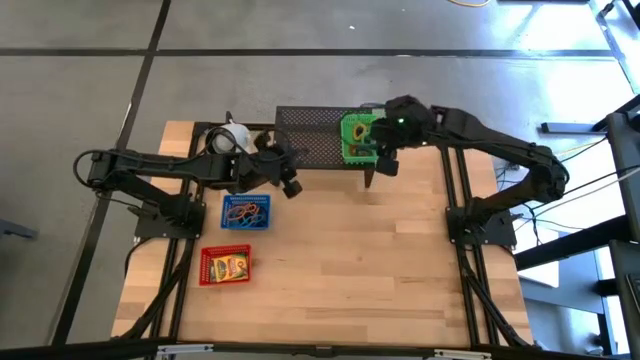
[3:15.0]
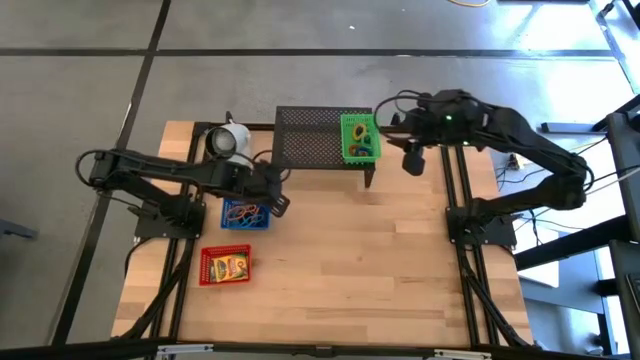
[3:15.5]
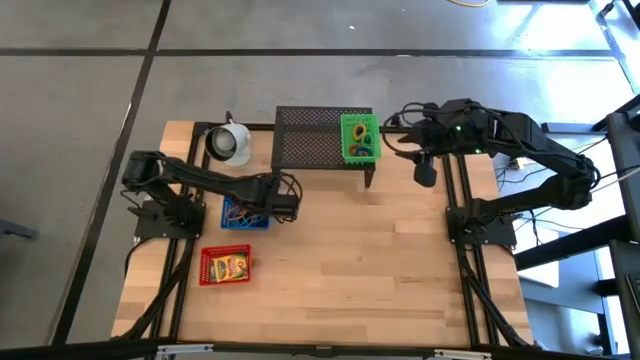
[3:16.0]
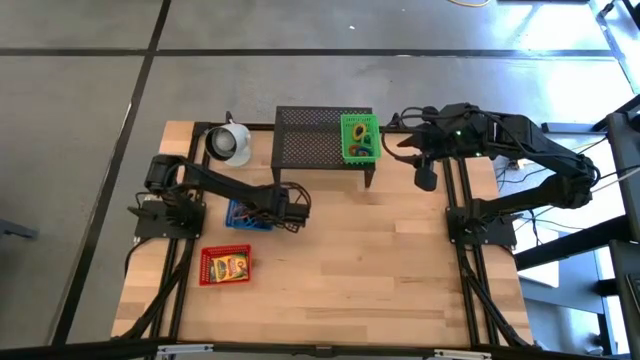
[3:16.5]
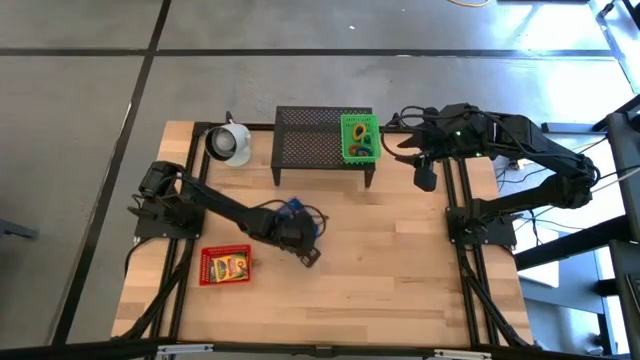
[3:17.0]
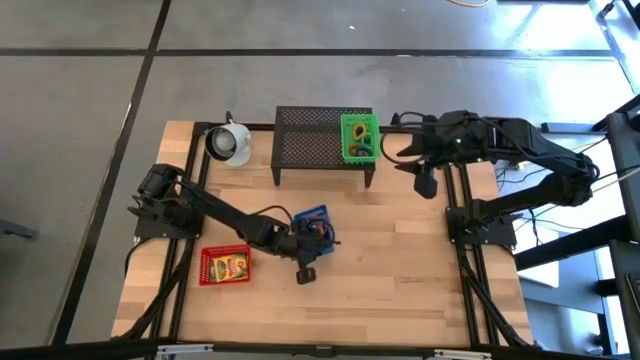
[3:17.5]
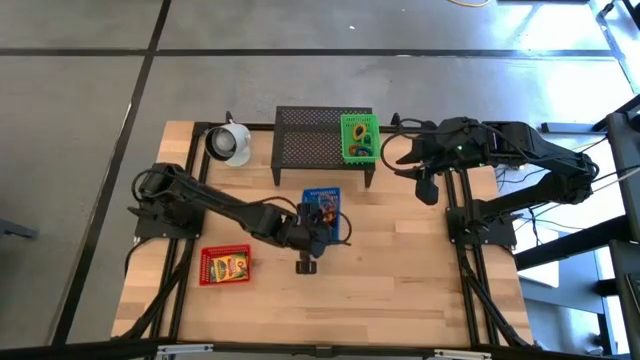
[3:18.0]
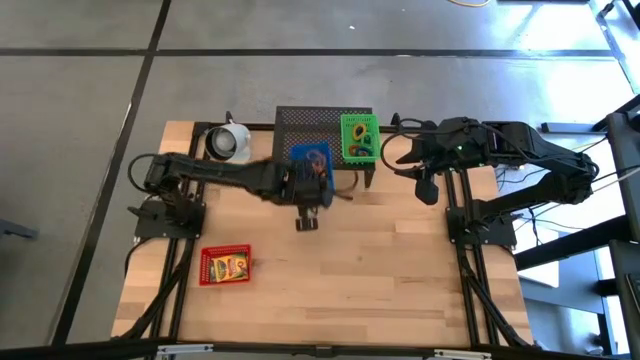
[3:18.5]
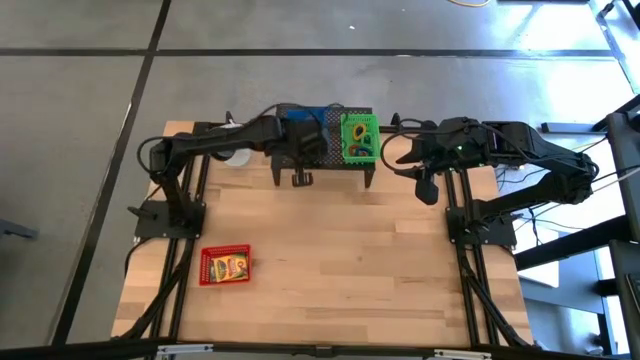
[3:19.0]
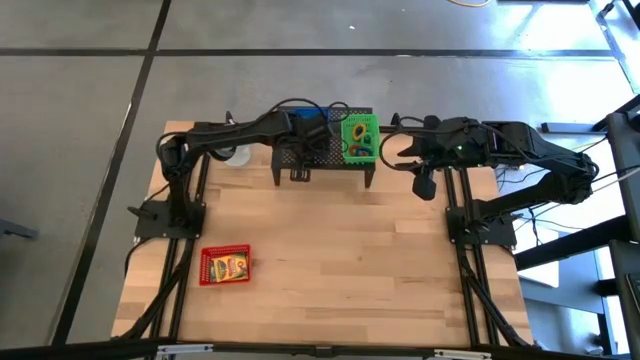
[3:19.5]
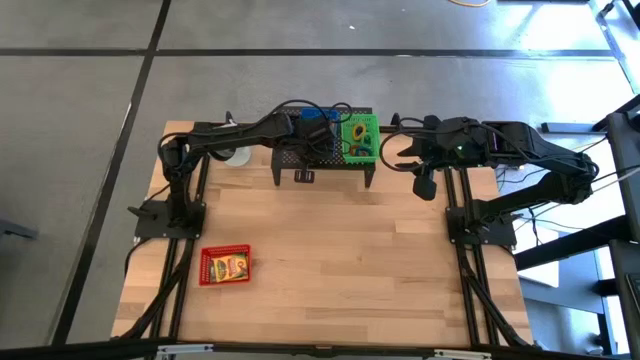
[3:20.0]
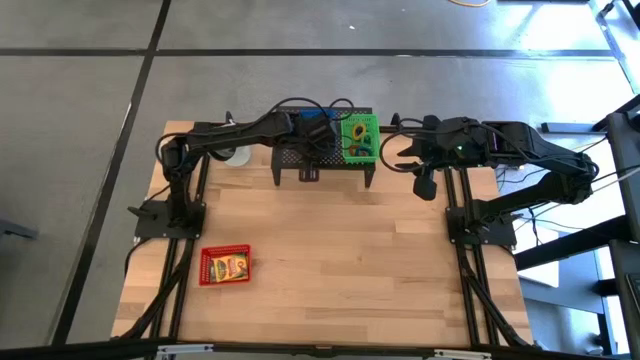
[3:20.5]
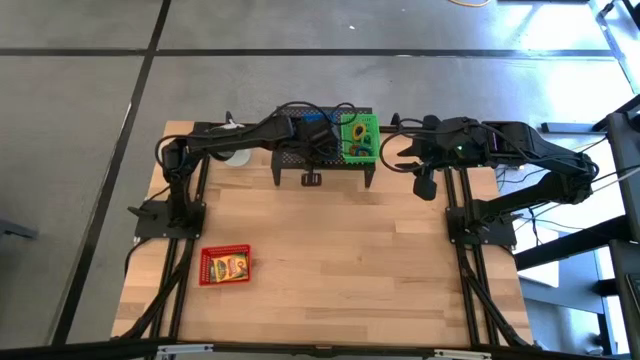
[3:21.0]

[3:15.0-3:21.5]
Task: Pick & Place Office Desk Supplies
Put the blue bin on the shelf

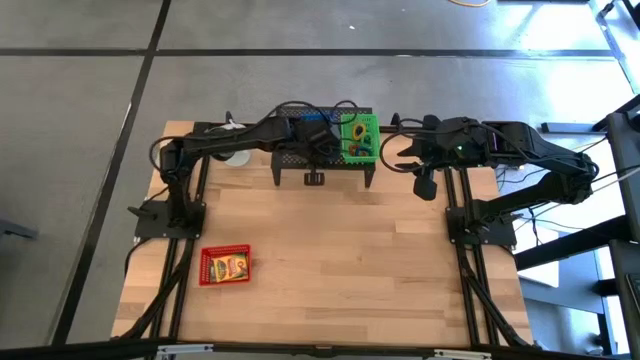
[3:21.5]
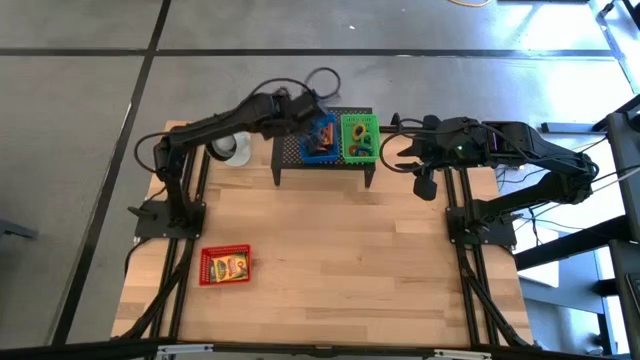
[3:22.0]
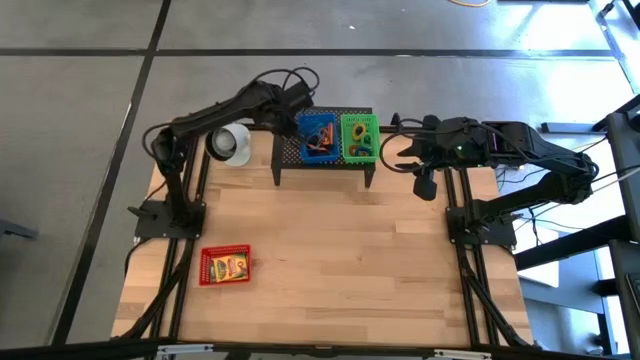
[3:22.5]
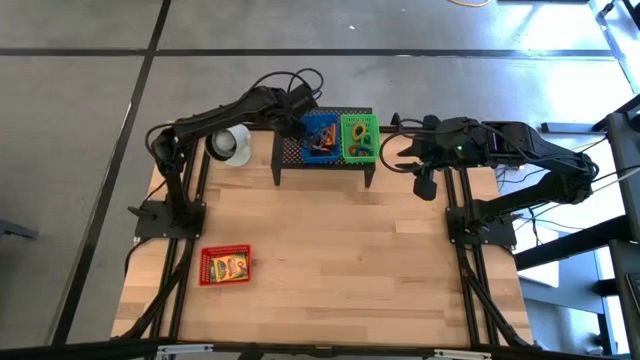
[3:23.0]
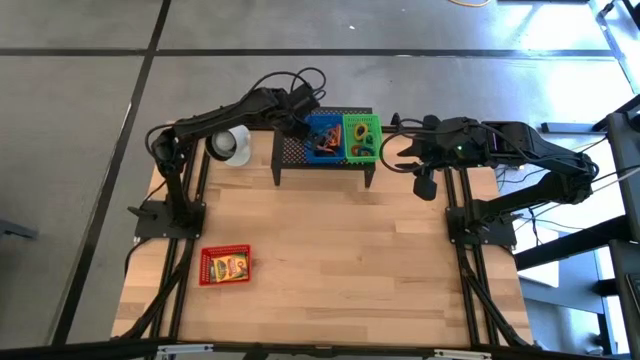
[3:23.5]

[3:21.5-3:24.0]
Adjust the blue bin on the shelf

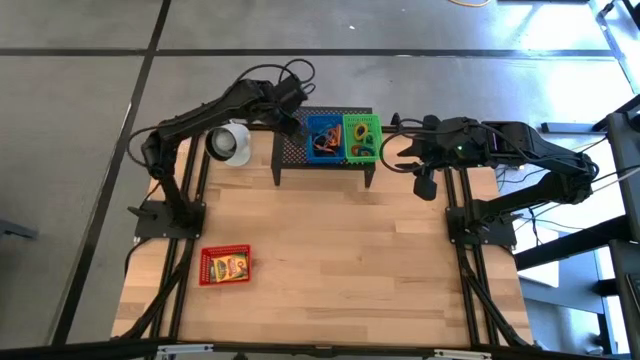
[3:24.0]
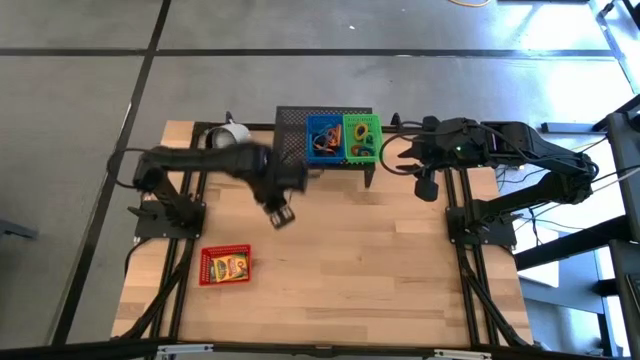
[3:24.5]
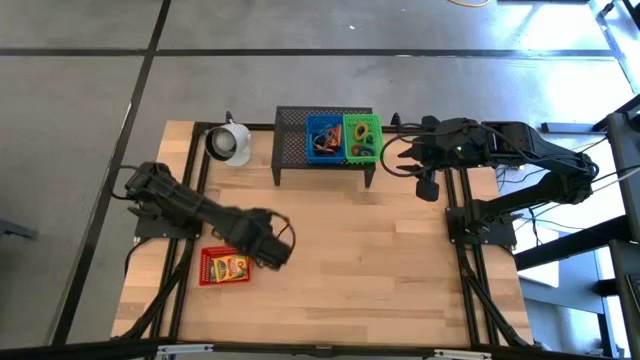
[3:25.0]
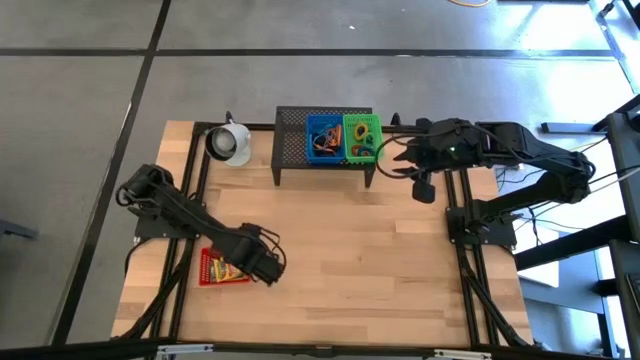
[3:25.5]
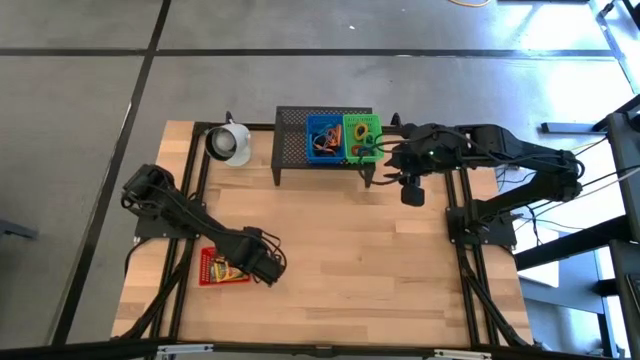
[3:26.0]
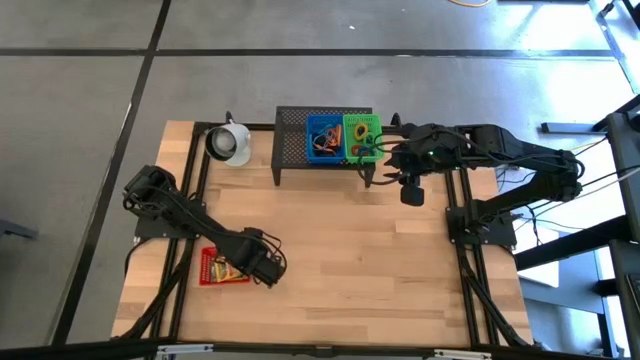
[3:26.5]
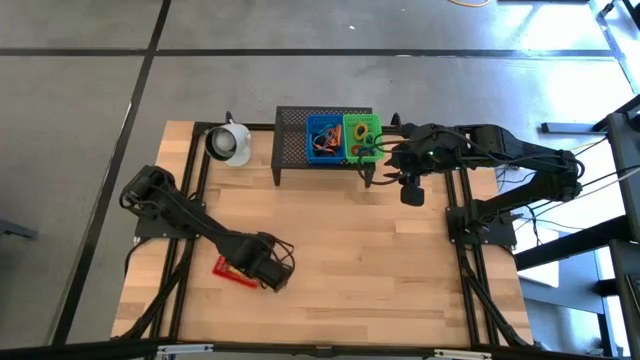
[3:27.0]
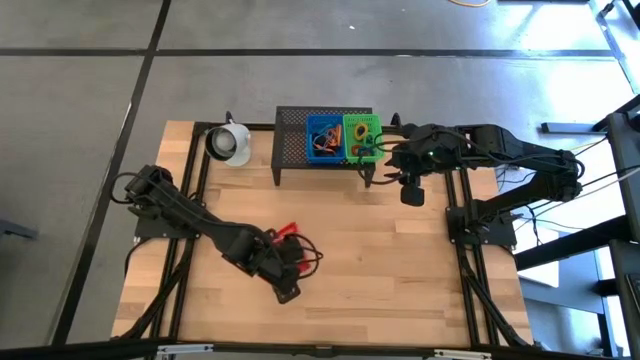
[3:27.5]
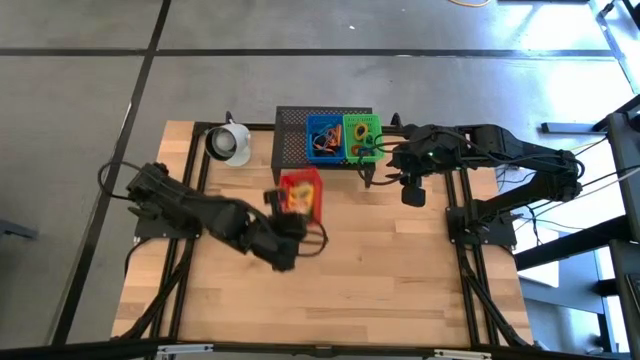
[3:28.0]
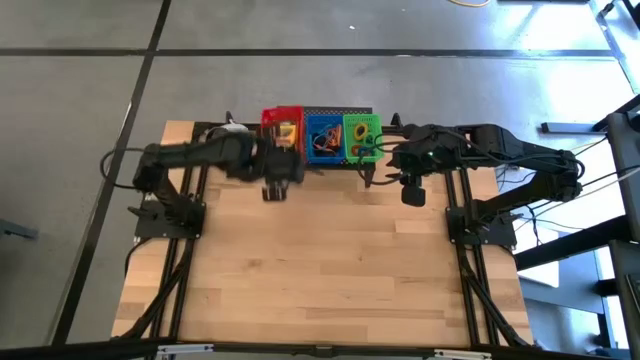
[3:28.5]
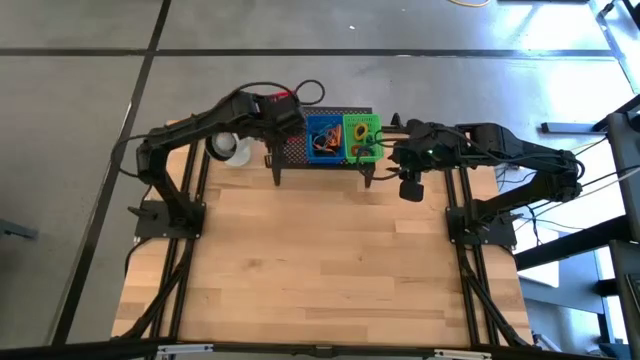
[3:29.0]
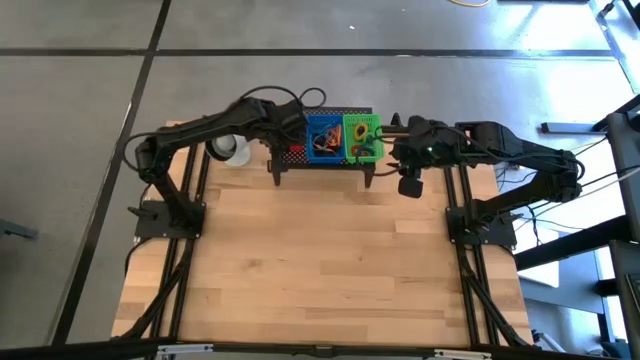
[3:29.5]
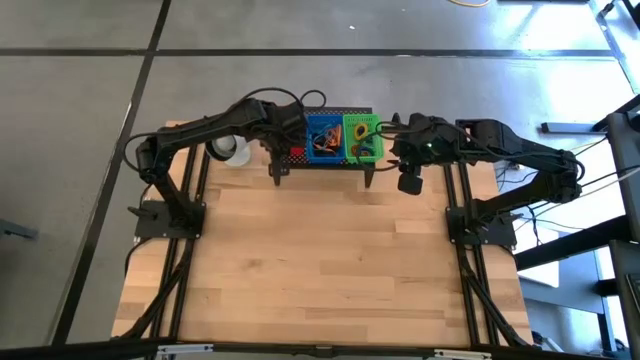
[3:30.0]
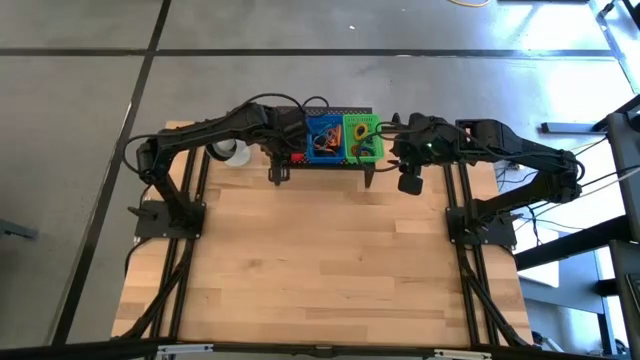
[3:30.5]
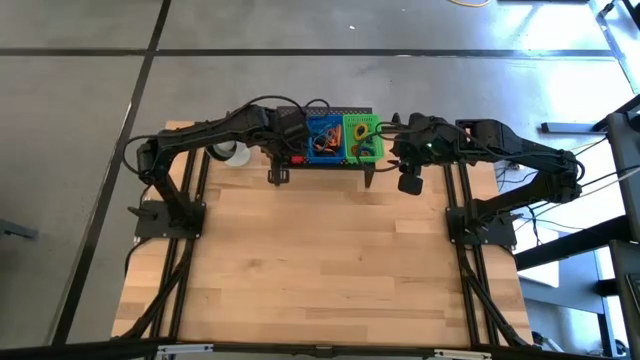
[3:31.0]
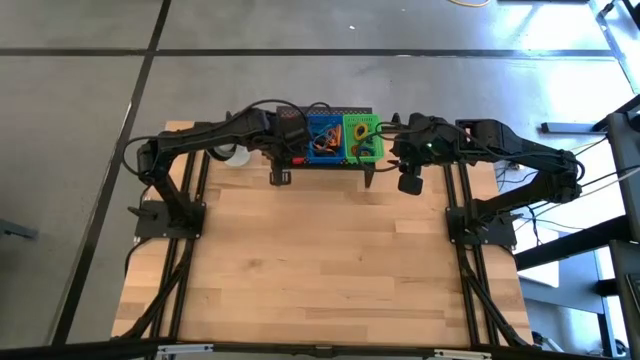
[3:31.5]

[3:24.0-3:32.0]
Put the red bin on the shelf

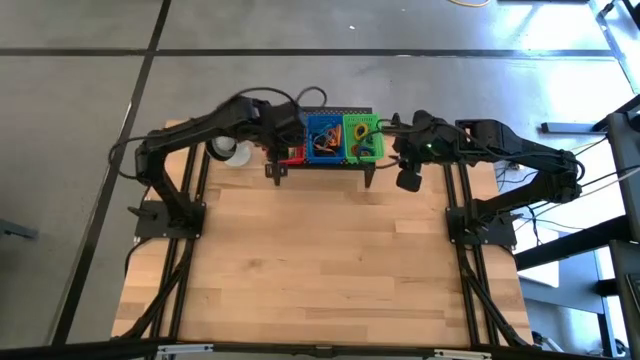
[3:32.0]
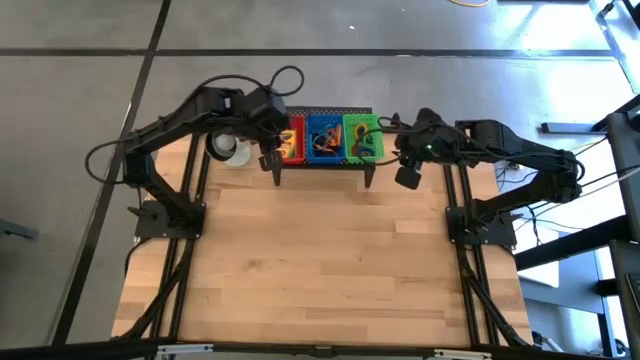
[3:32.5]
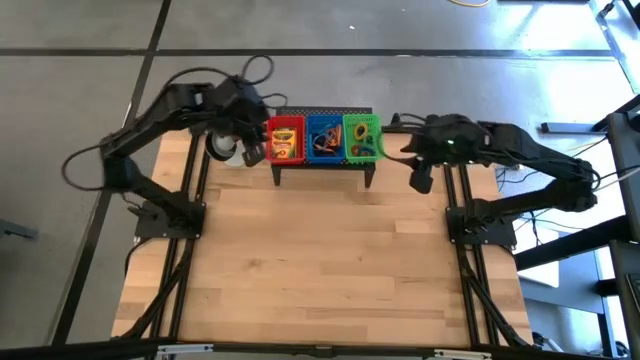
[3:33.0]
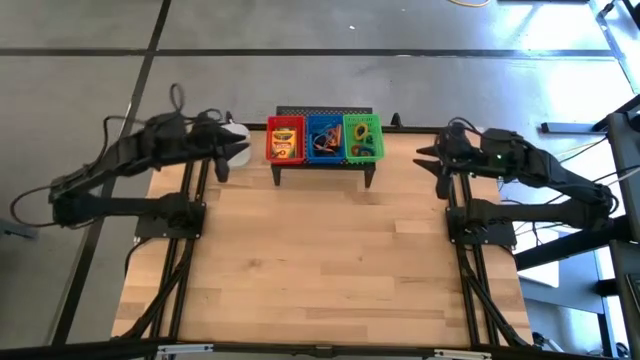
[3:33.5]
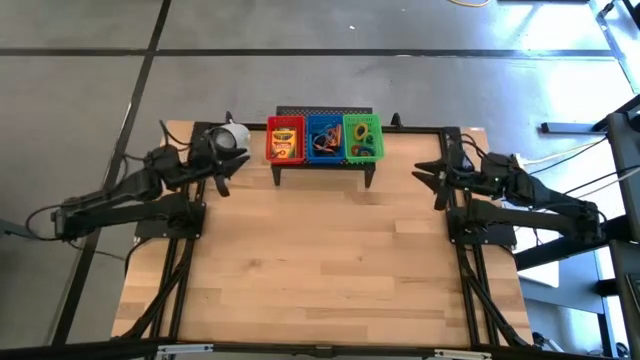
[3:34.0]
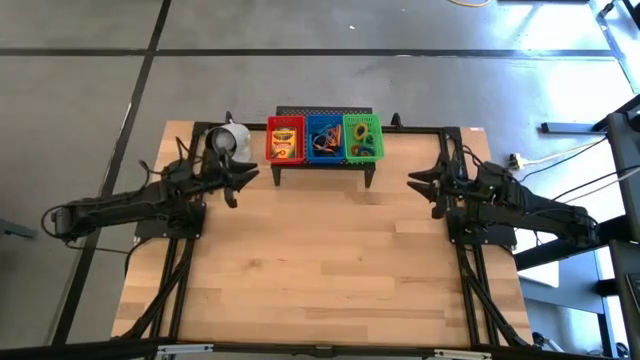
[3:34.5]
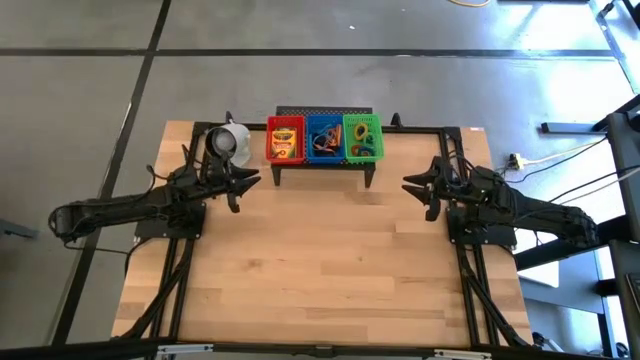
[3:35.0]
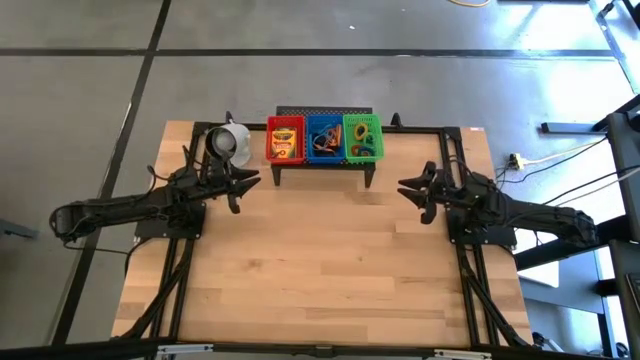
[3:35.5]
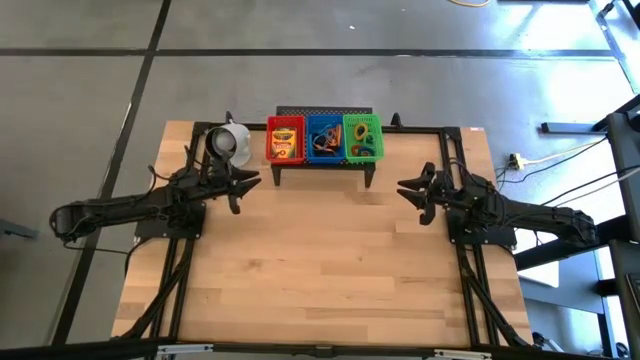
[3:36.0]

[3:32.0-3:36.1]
Return to Home Position
